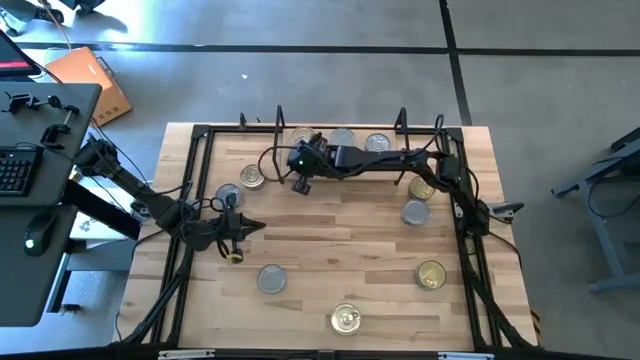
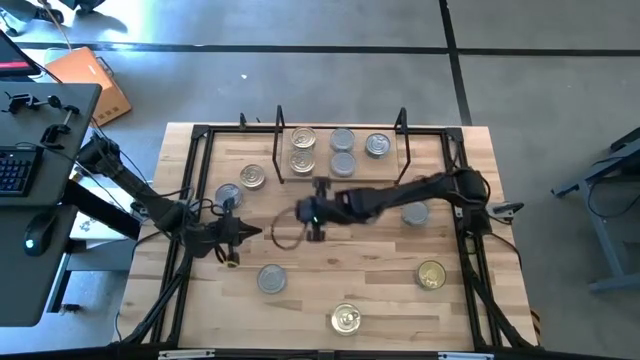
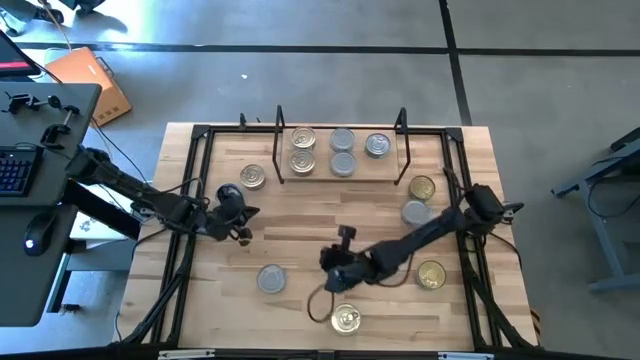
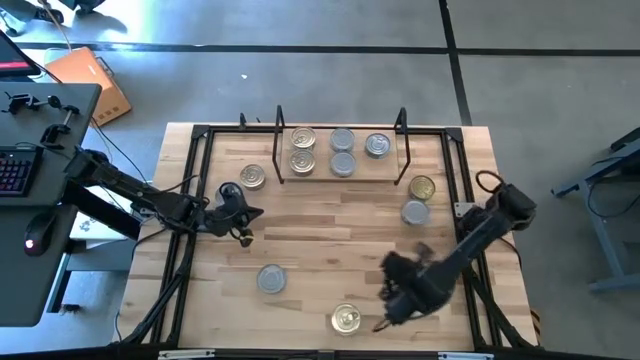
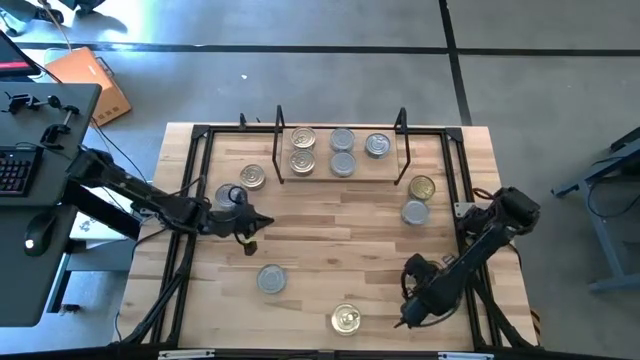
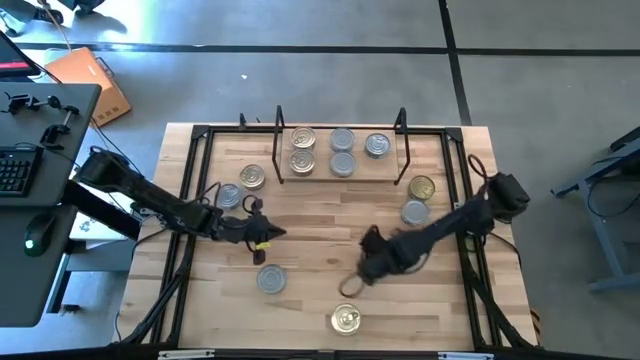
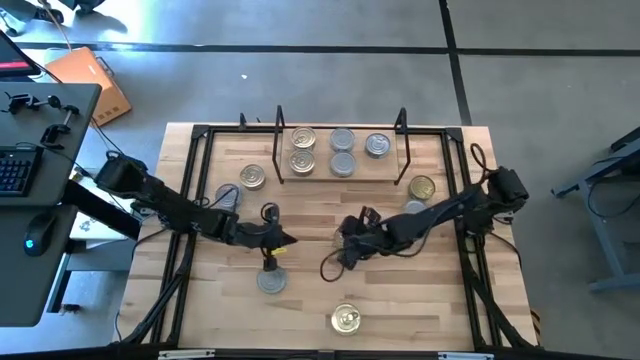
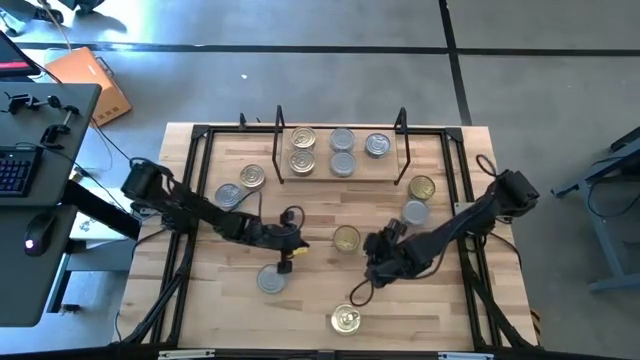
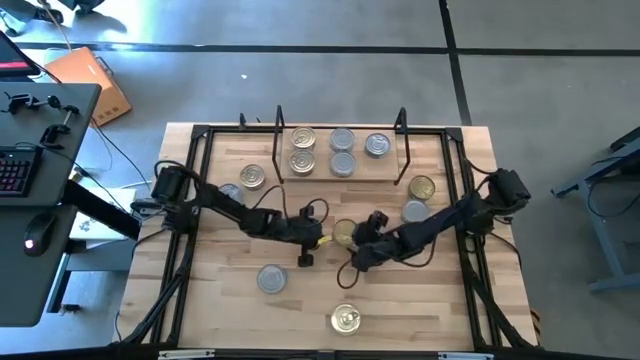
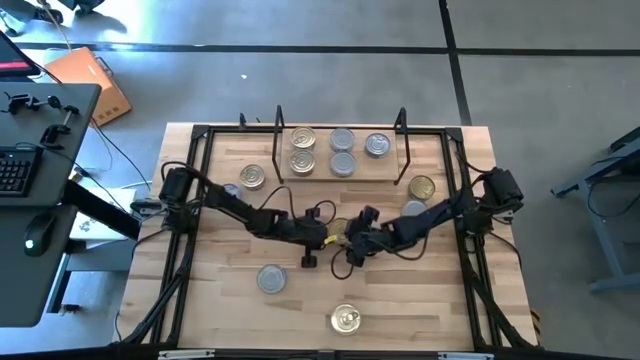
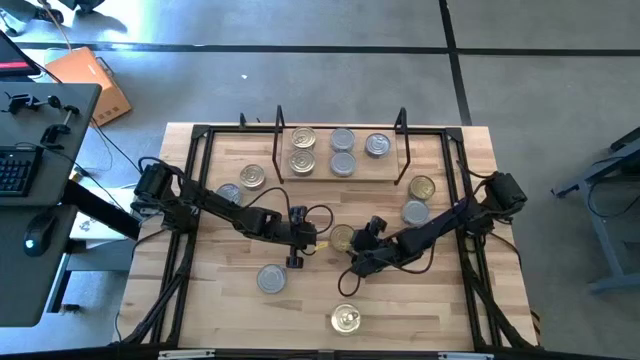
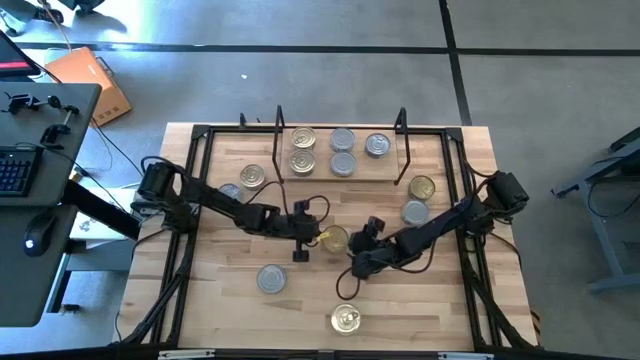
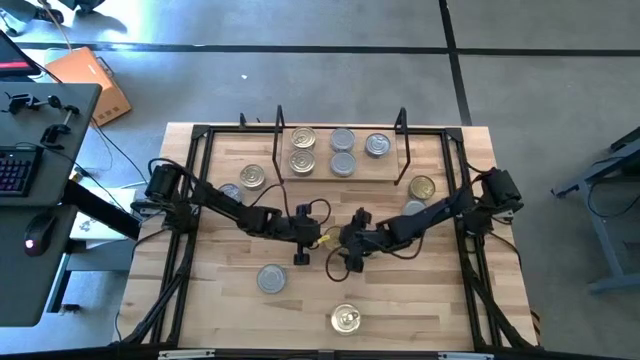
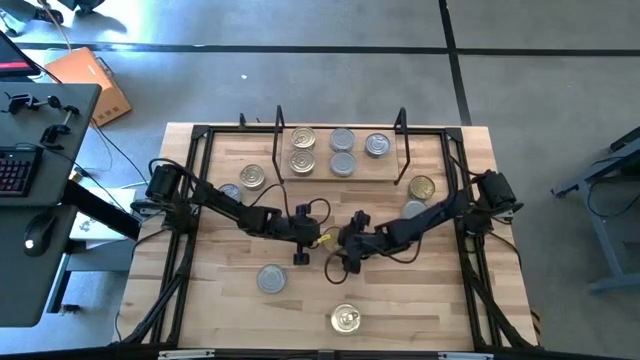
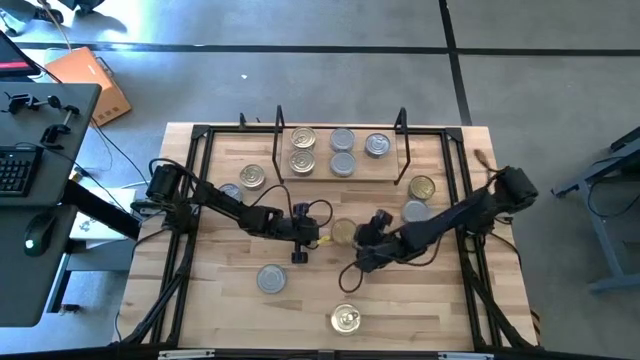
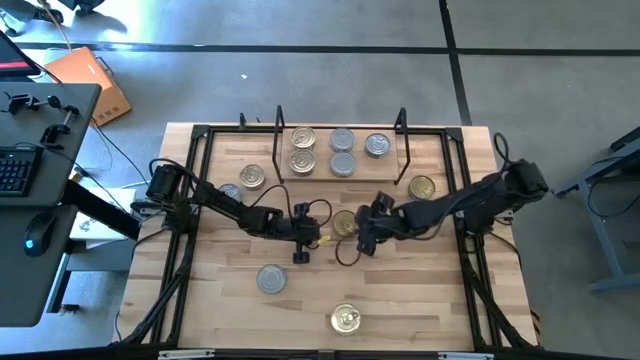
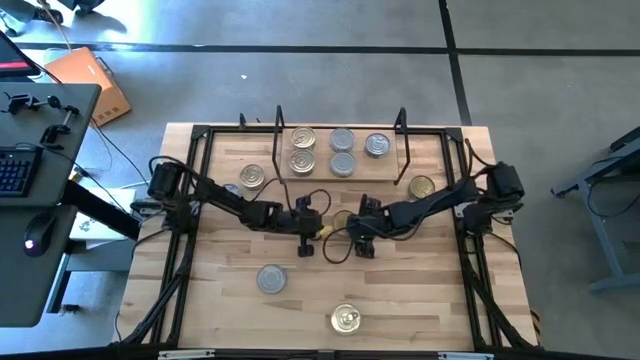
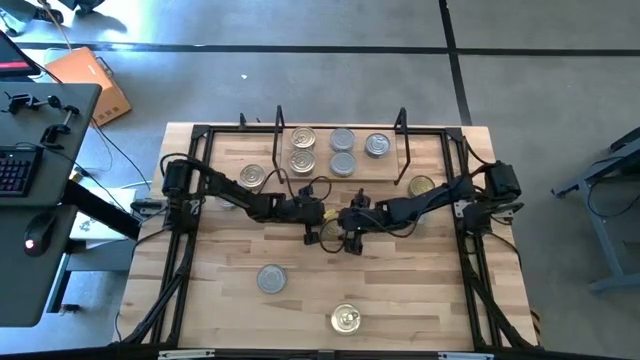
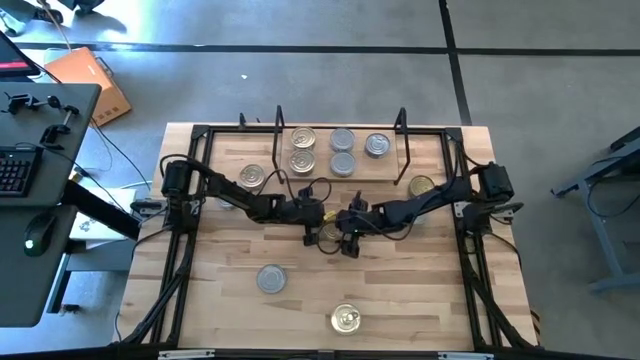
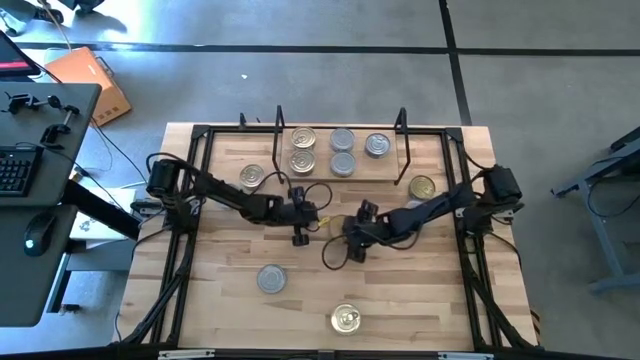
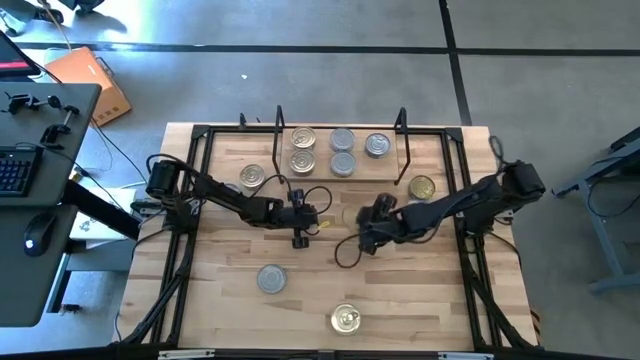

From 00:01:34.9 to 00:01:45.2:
Task: Stack canned seafood by type on shelf
Put the green tuna can on the shelf aligned with the other green tuna can

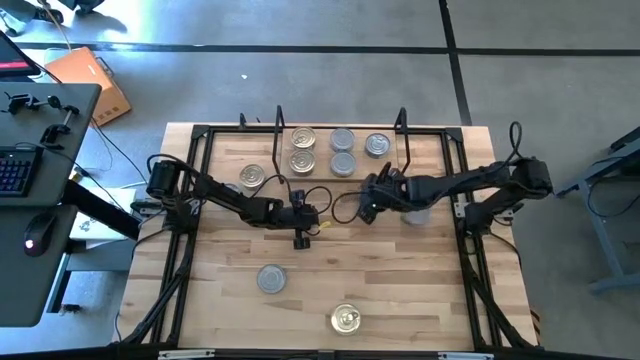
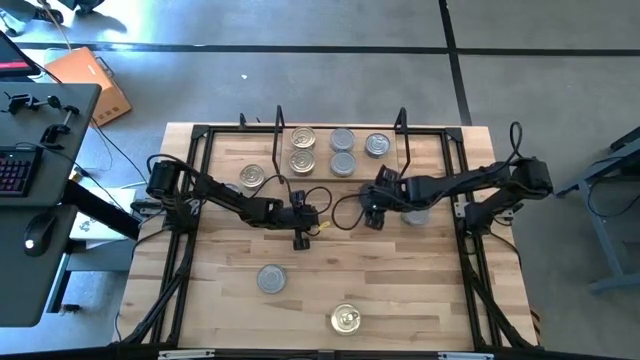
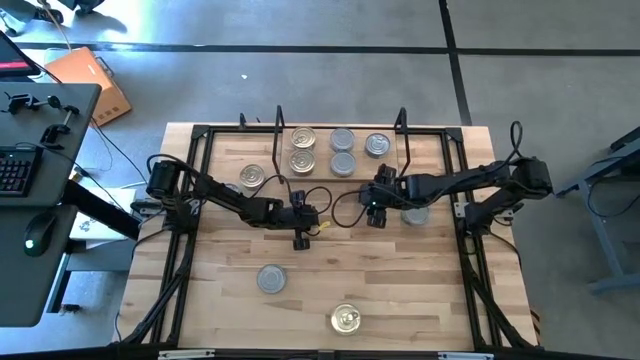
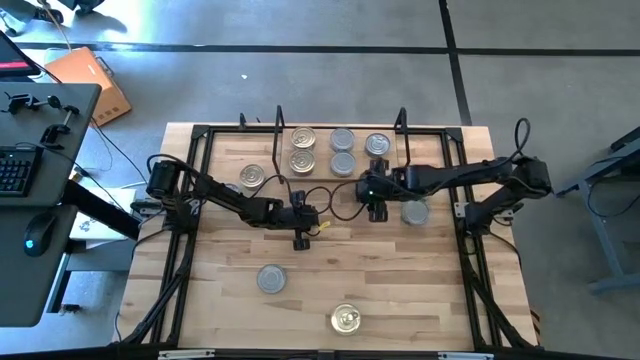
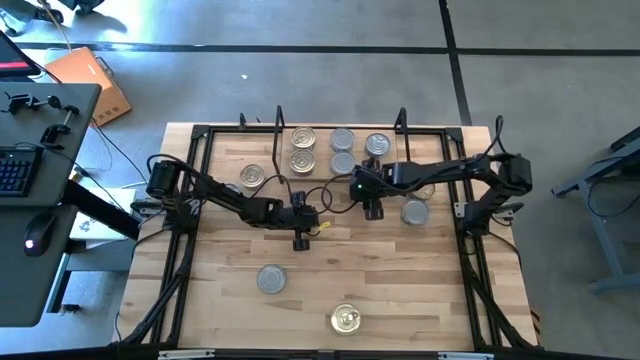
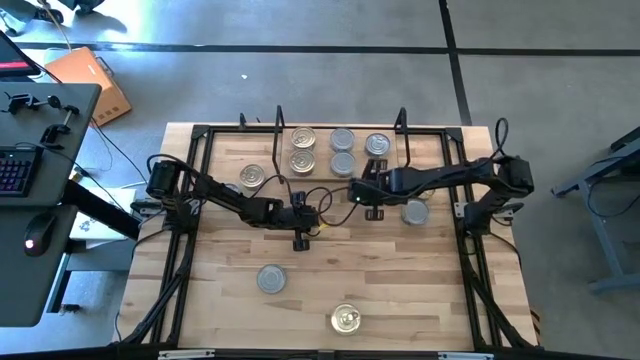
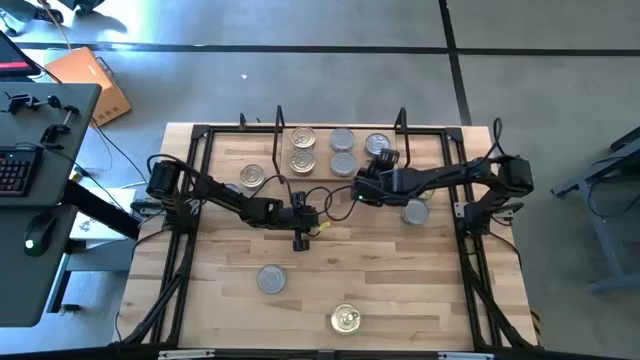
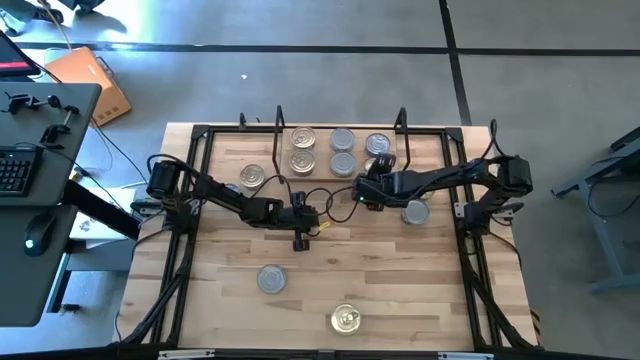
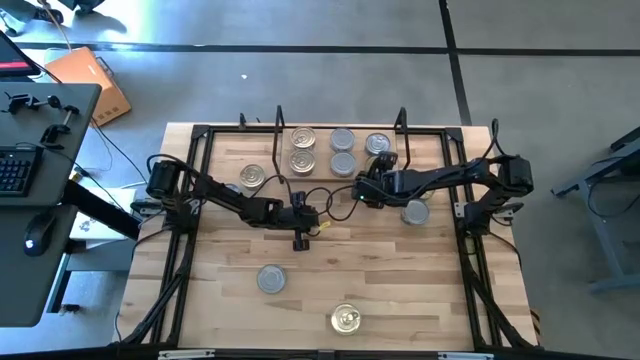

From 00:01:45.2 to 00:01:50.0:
Put the green tuna can on the shelf aligned with the other green tuna can

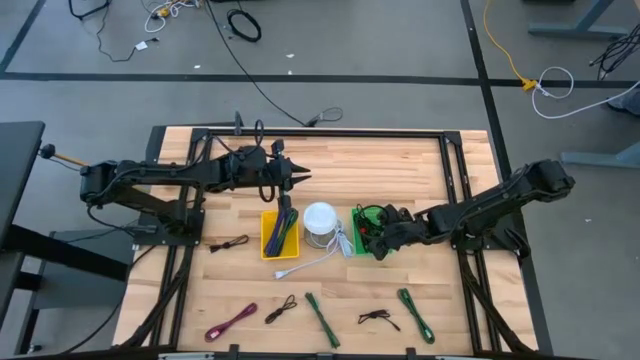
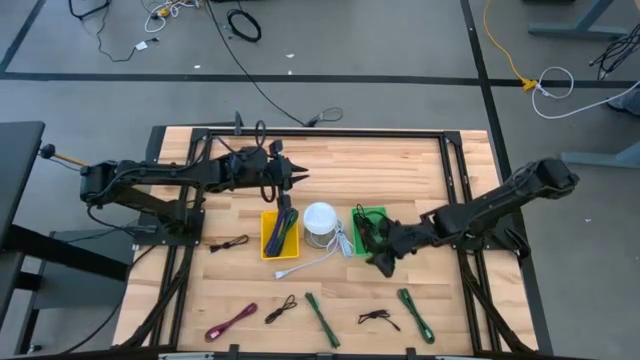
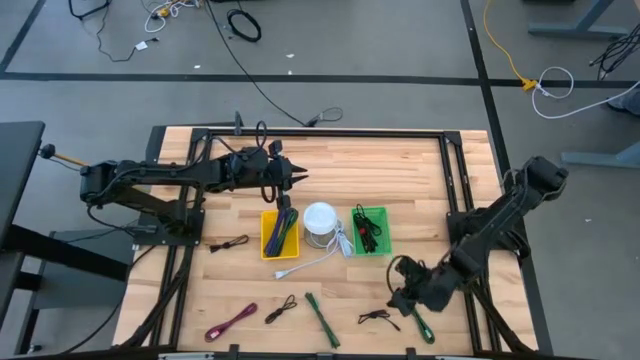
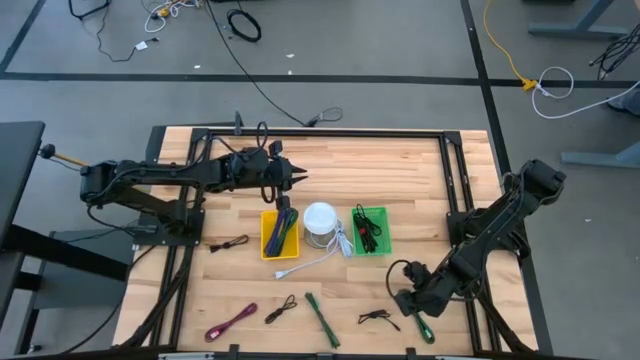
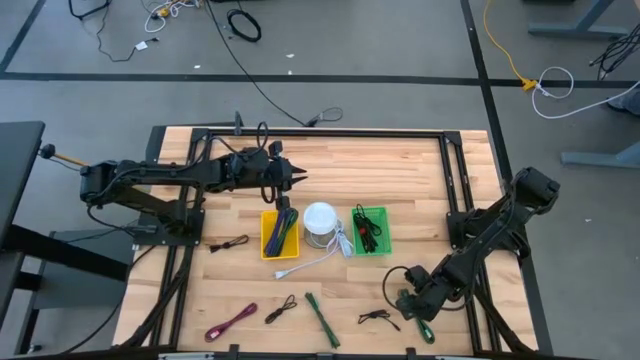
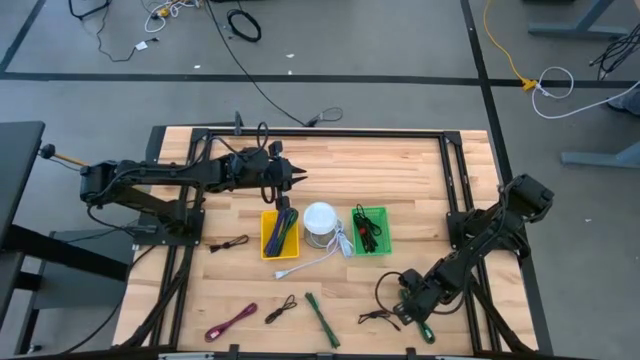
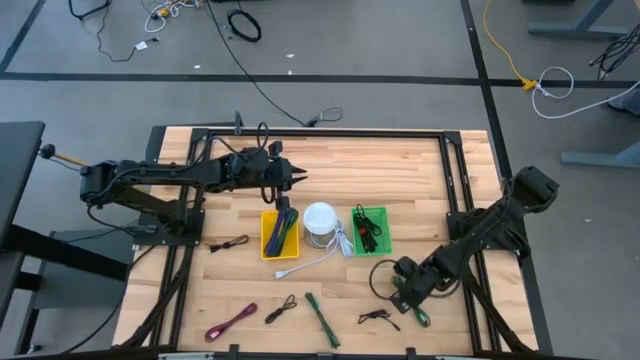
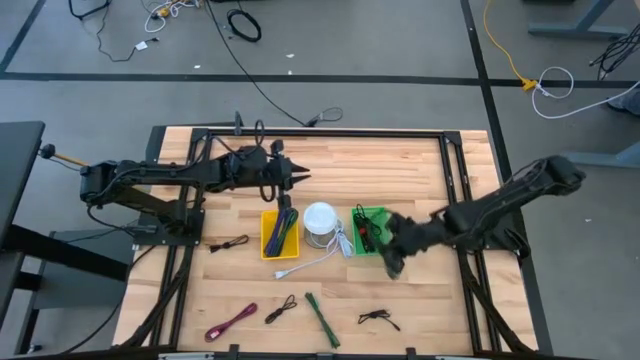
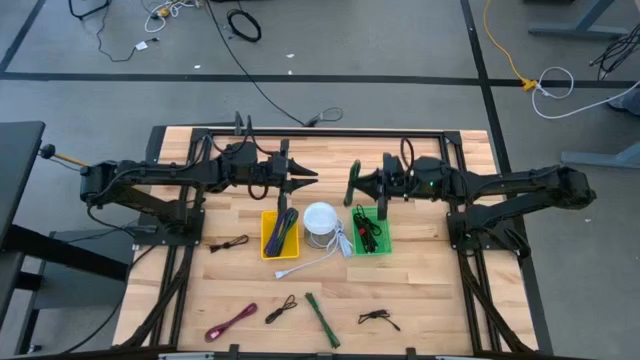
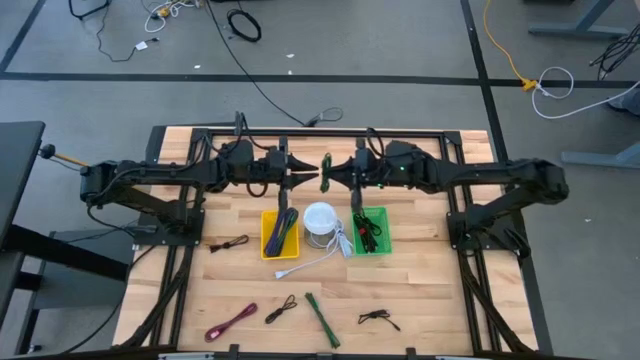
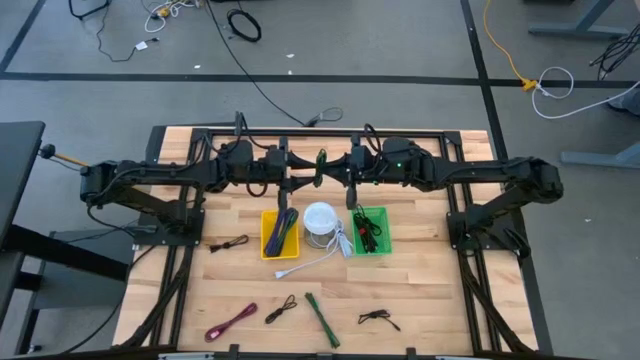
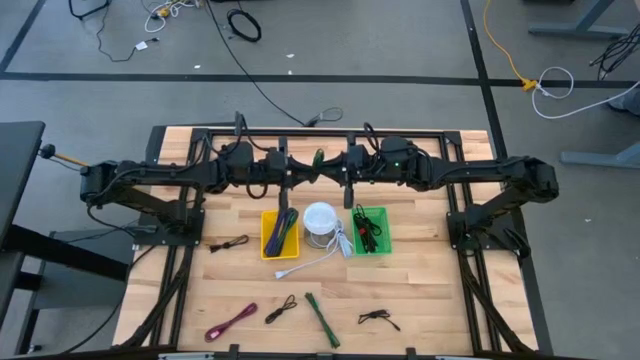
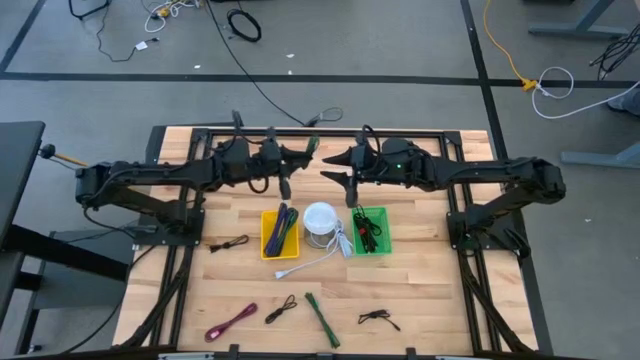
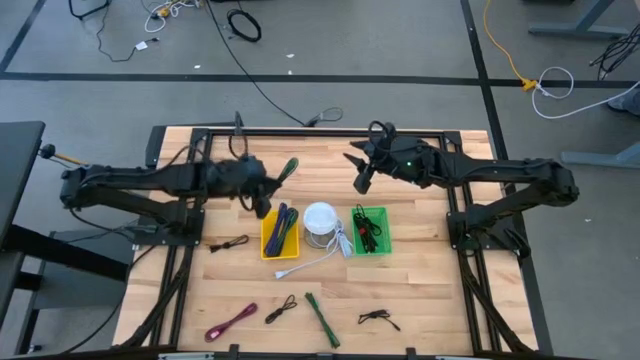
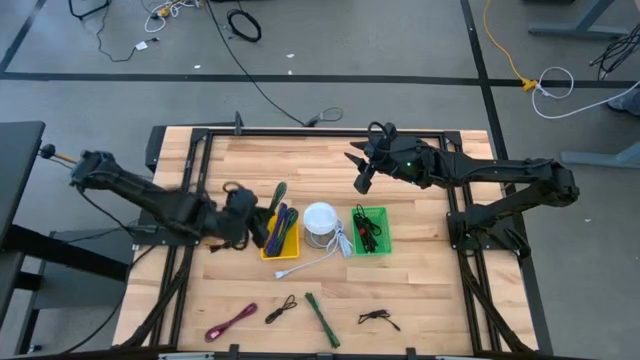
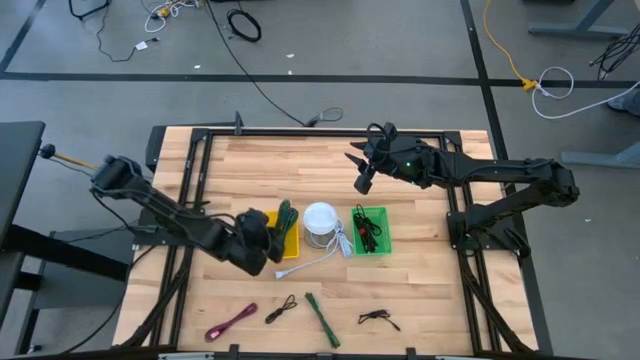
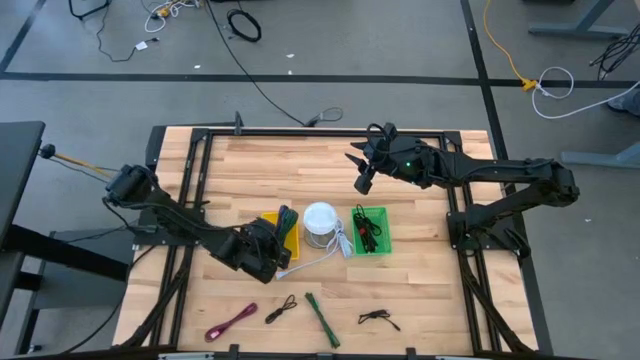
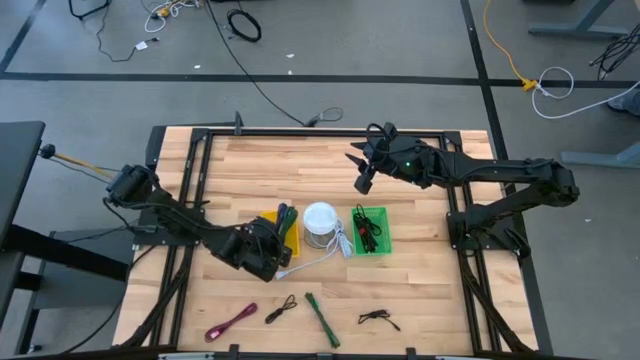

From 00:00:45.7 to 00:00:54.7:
Task: Pick & Place USB Port
Put the black green charger cable into the yellow basket
